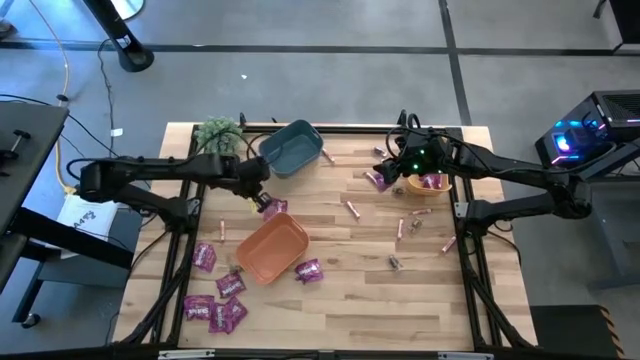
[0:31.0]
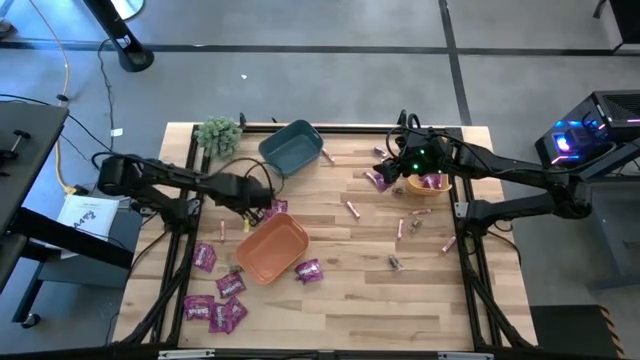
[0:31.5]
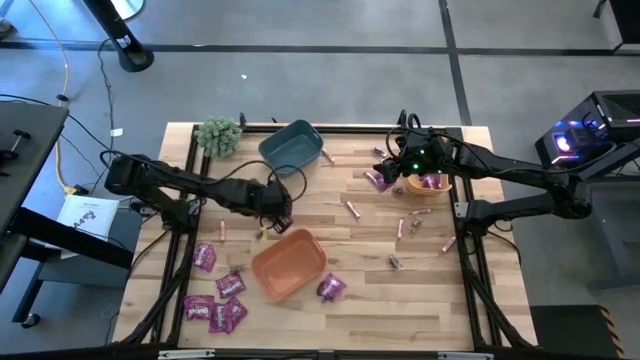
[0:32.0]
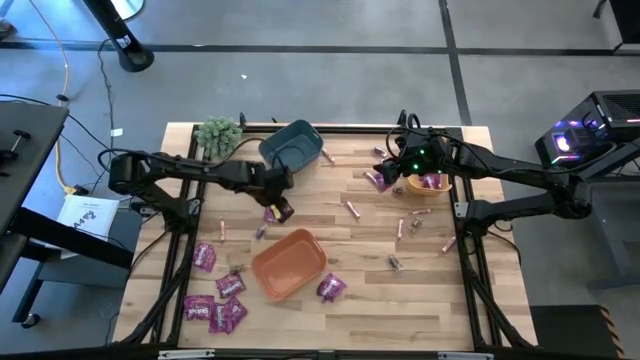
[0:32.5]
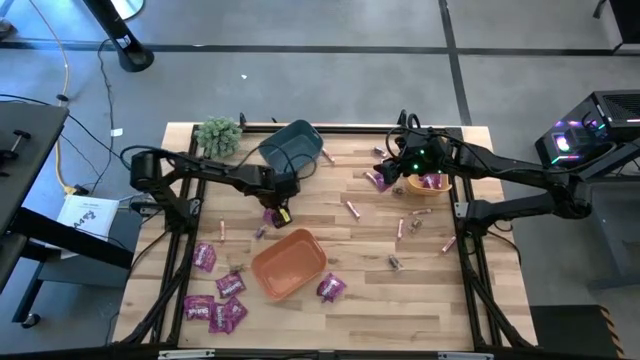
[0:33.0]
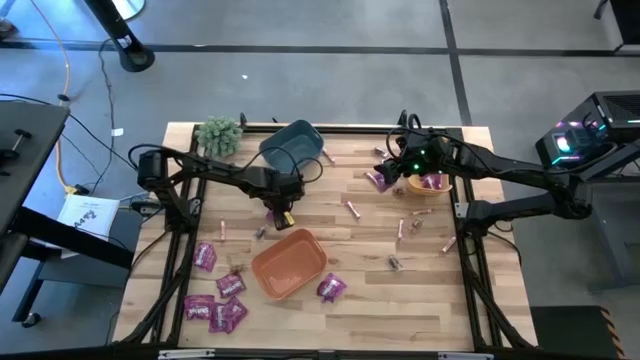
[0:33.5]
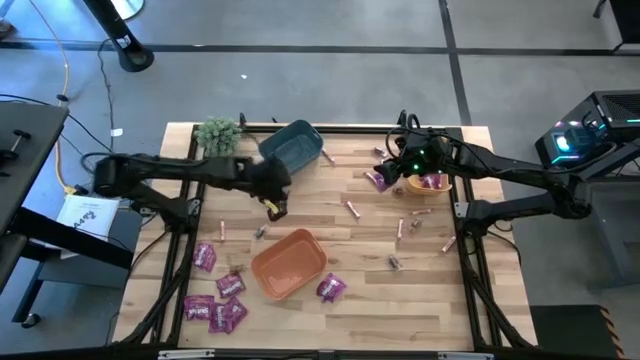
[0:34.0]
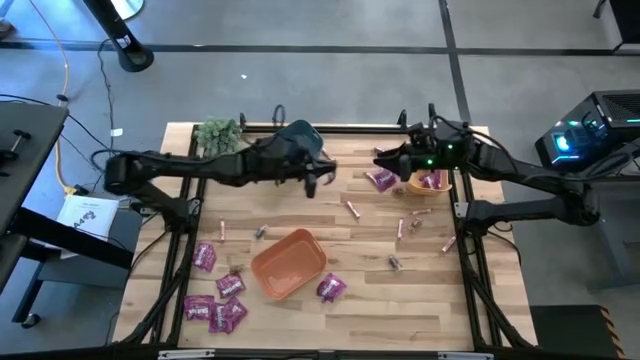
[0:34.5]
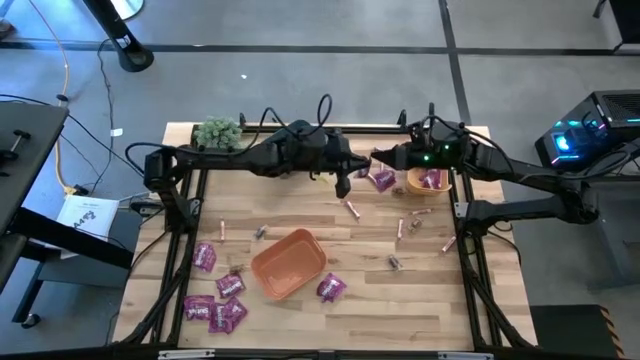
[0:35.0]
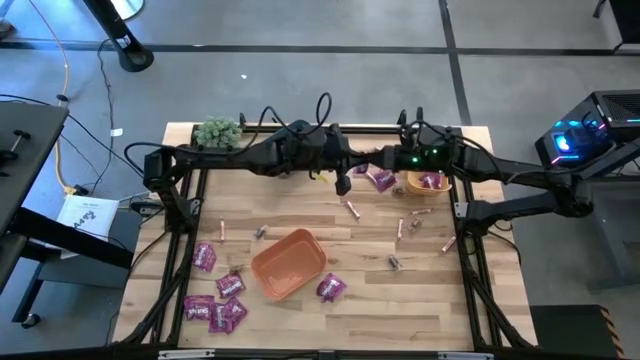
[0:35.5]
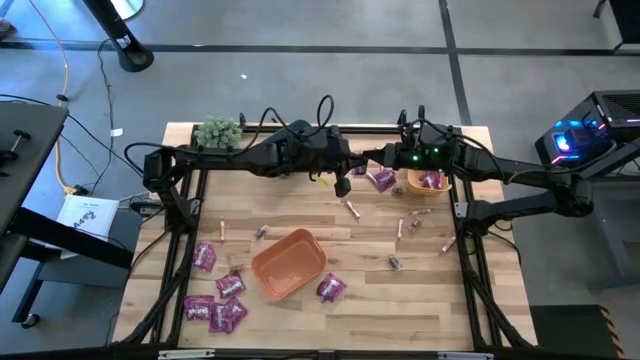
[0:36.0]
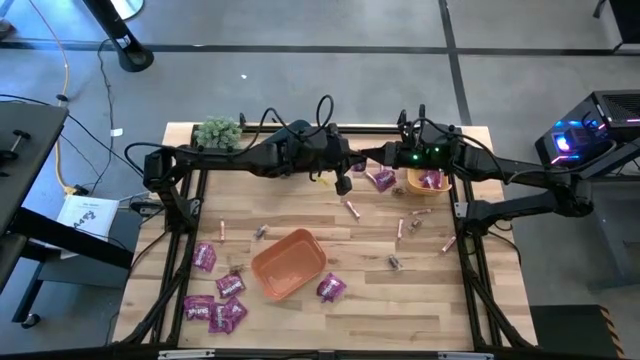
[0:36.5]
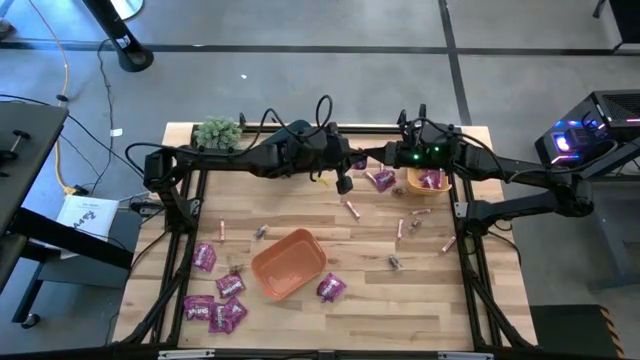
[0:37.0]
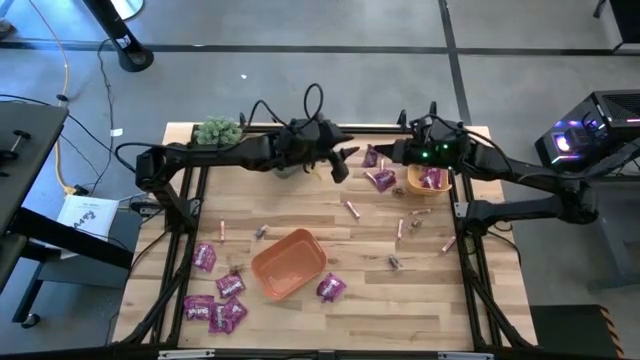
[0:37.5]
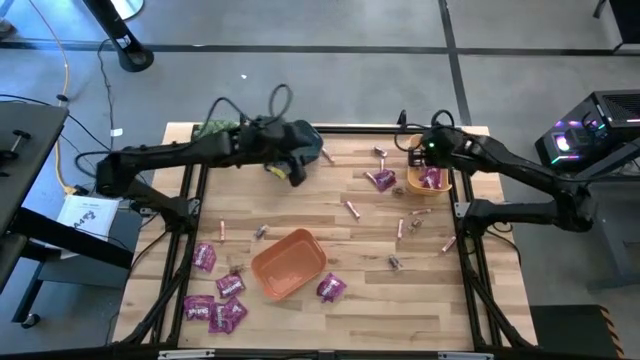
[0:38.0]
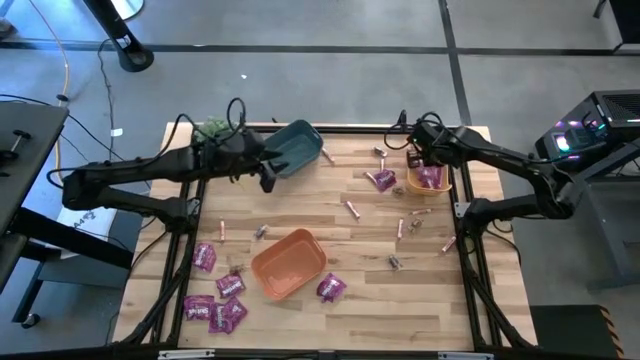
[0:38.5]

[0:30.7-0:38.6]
Task: Sort candy
Put the purple candy into the yellow bin

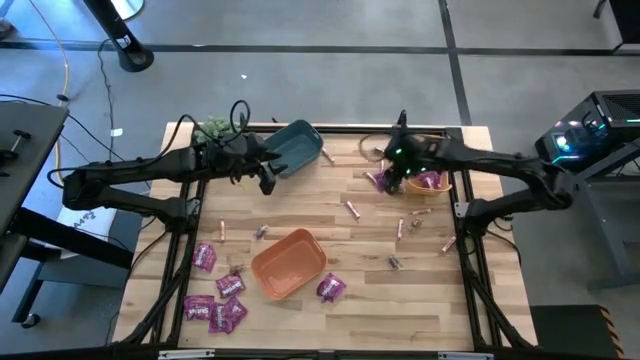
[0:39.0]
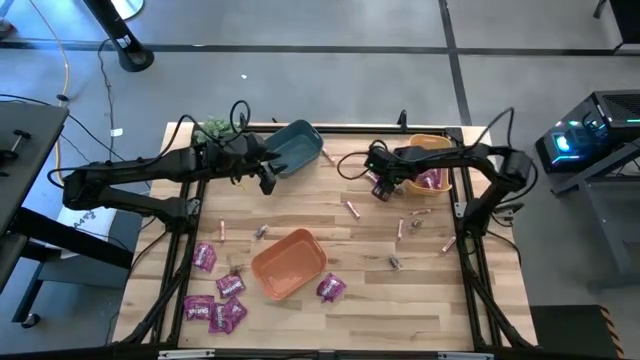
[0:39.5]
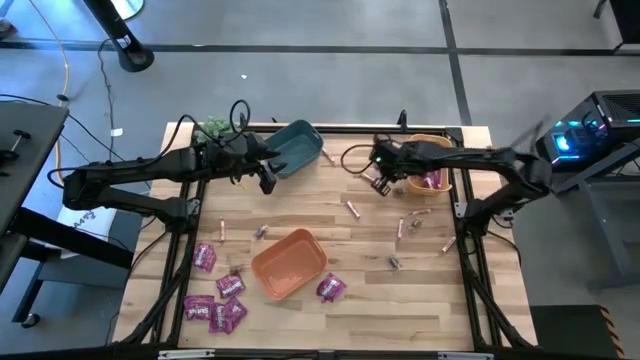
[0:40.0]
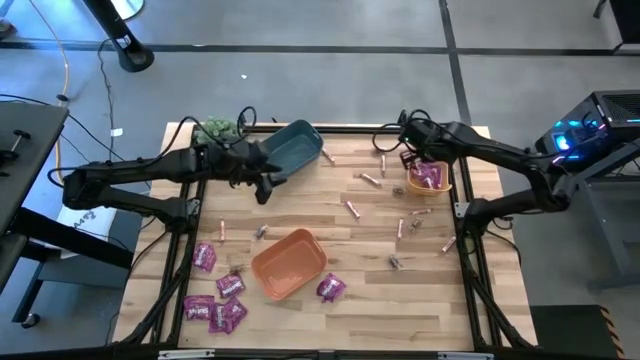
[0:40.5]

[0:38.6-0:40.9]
Put the purple candy into the yellow bin

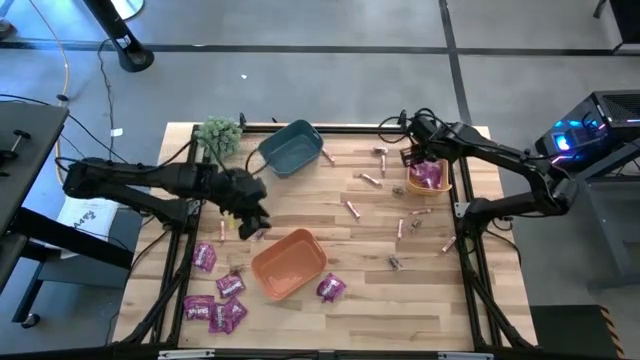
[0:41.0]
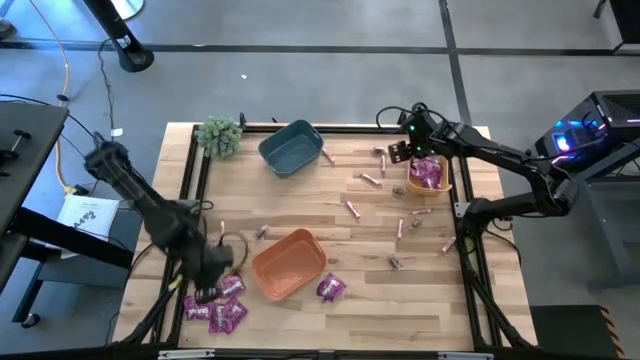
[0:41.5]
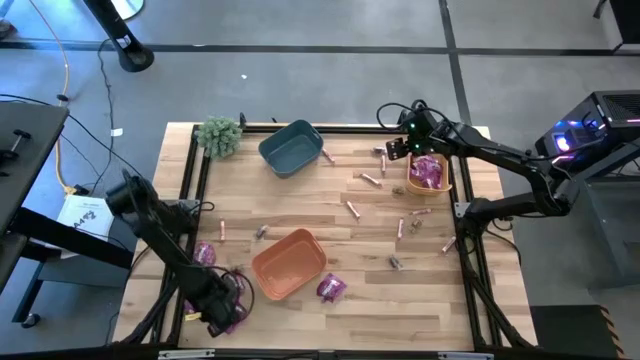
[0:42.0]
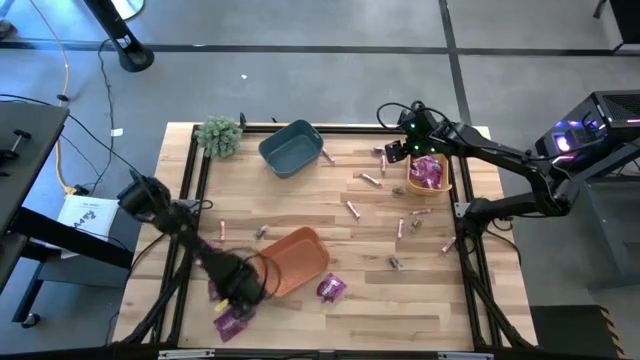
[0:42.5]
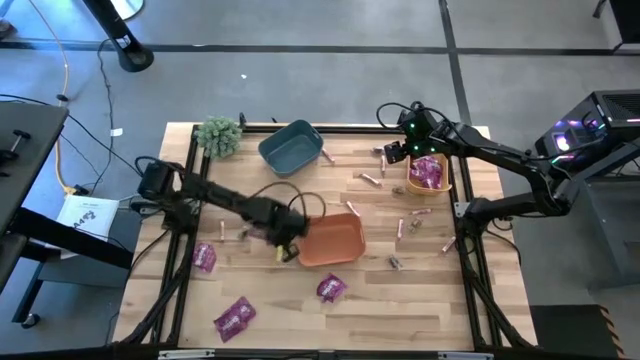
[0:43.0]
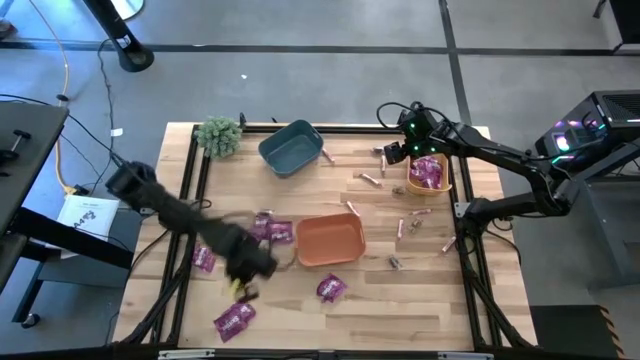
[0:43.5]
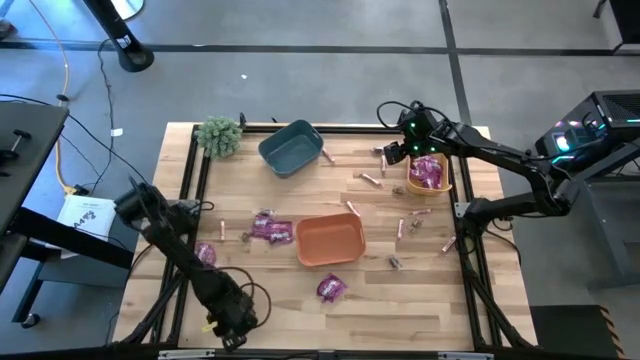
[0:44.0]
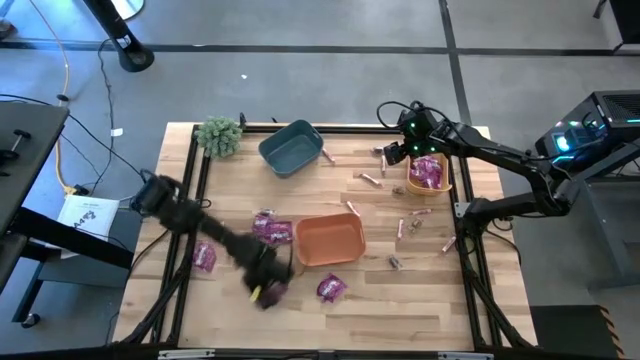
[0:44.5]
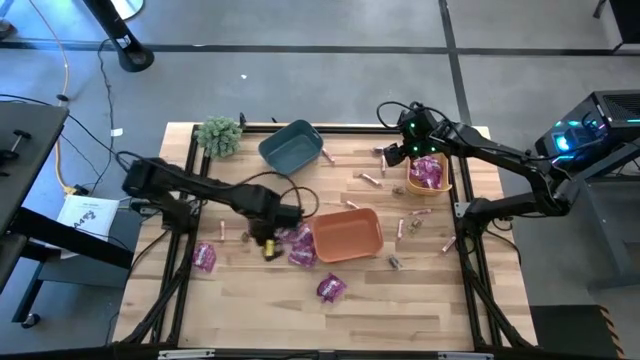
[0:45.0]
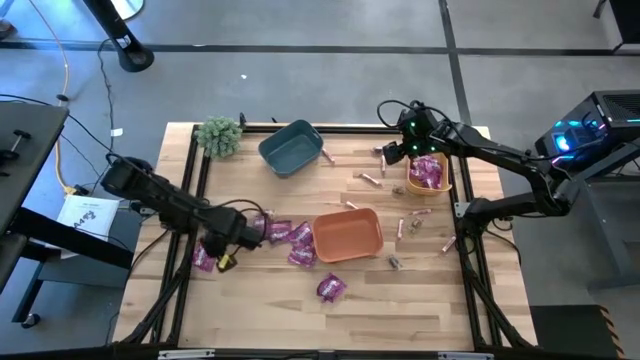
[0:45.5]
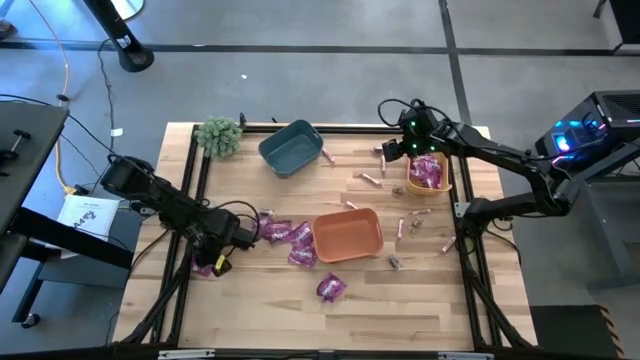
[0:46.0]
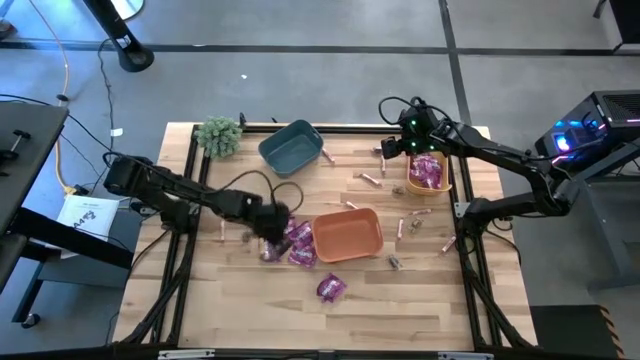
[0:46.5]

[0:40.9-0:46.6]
Adjust the purple candies on the table

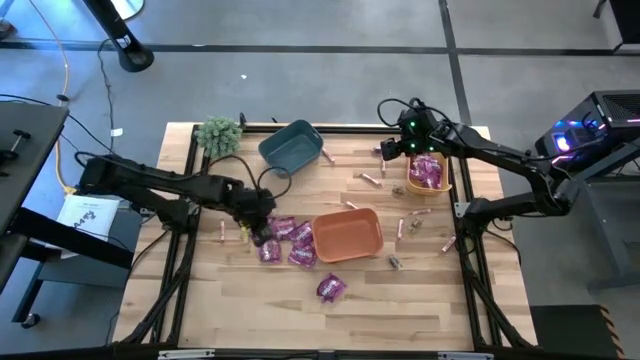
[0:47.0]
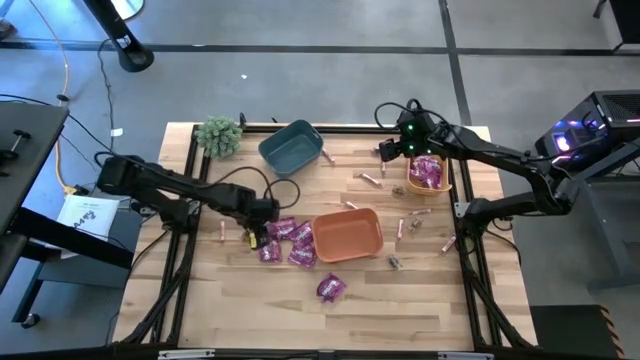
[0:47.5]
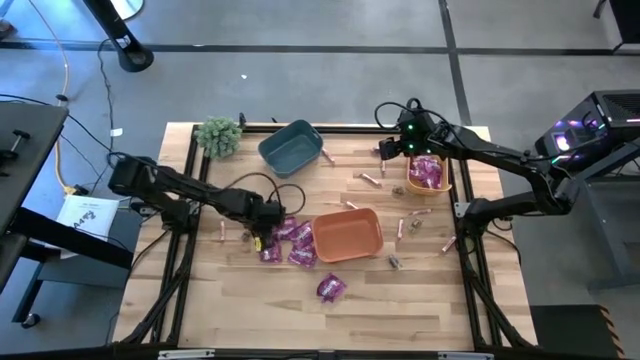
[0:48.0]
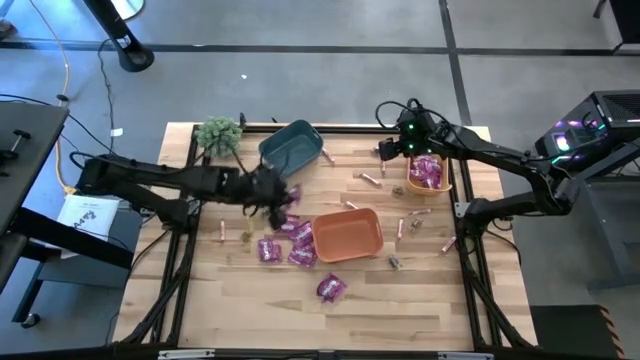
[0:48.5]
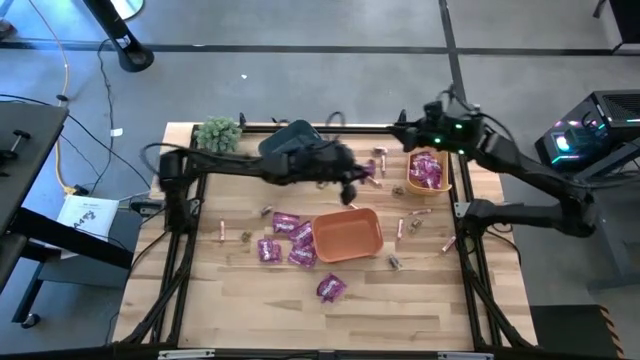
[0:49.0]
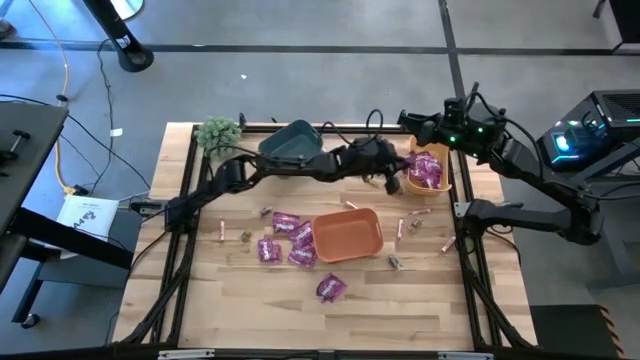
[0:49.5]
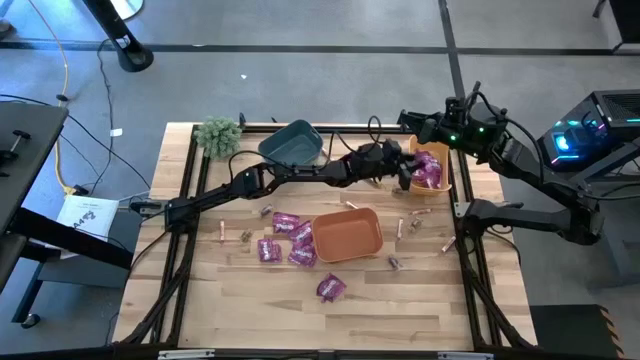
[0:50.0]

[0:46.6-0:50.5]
Put the purple candy into the yellow bin

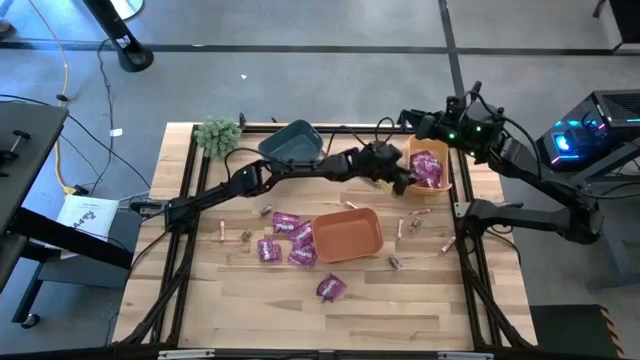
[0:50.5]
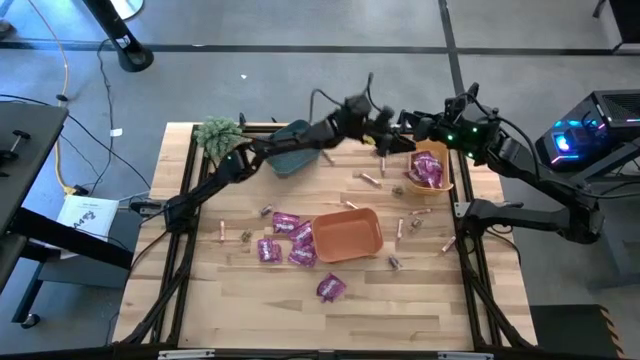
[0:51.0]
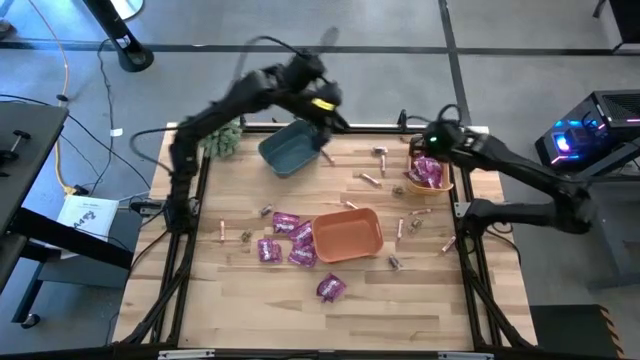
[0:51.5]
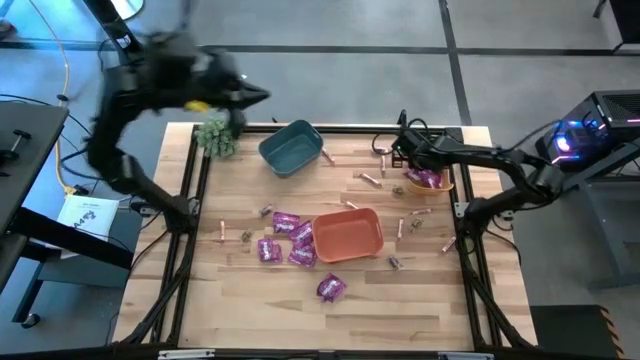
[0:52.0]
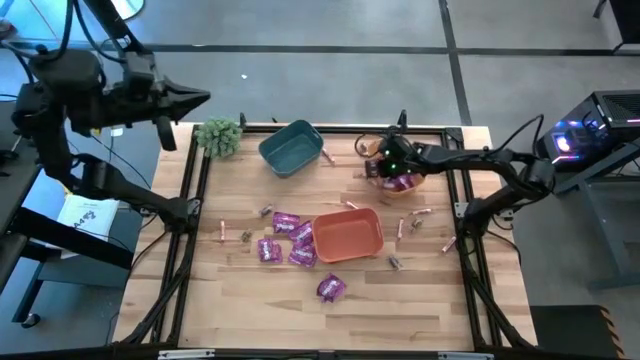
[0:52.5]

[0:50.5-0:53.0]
Move the yellow bin to the center of the table

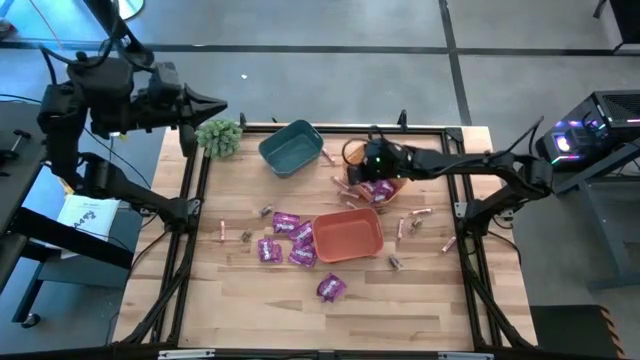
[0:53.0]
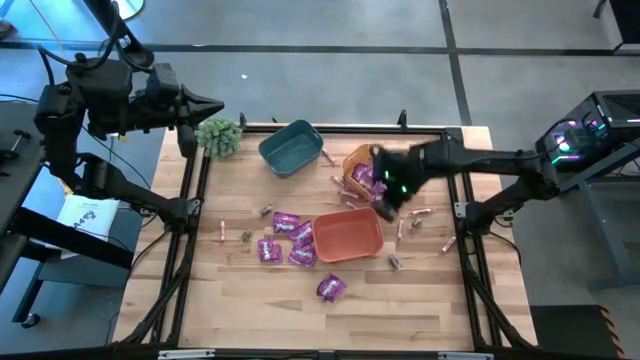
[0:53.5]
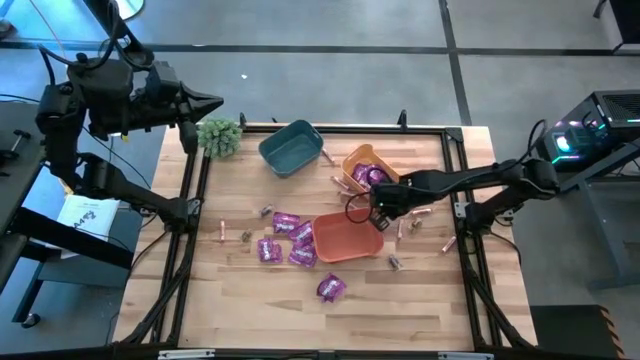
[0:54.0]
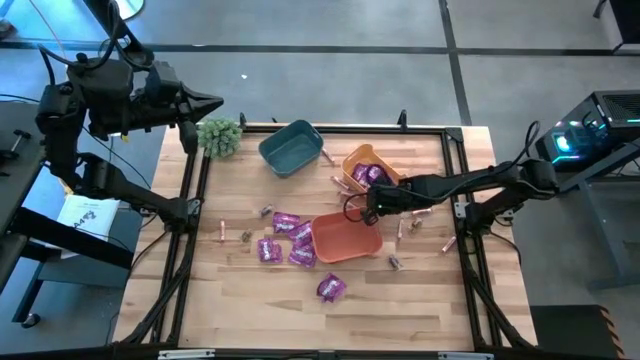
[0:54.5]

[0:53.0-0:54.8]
Adjust the purple candy in the bin
